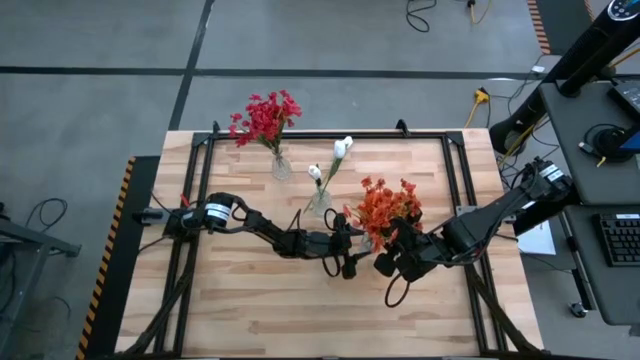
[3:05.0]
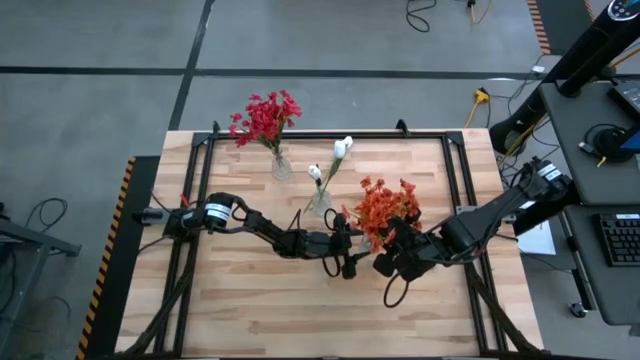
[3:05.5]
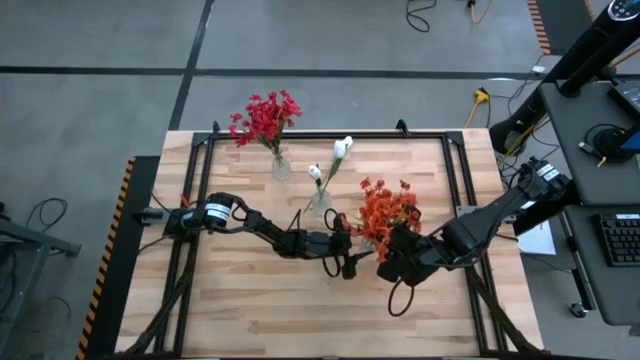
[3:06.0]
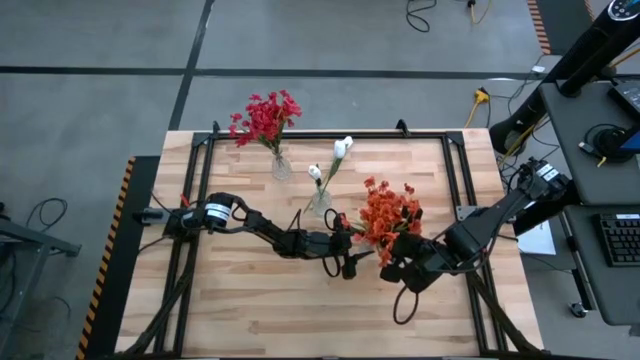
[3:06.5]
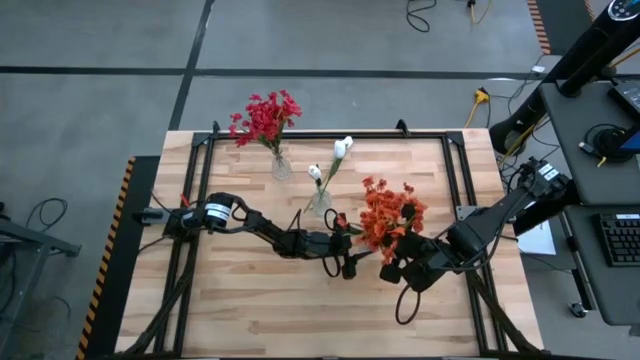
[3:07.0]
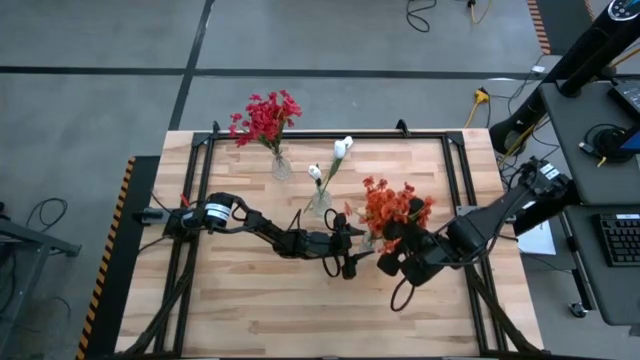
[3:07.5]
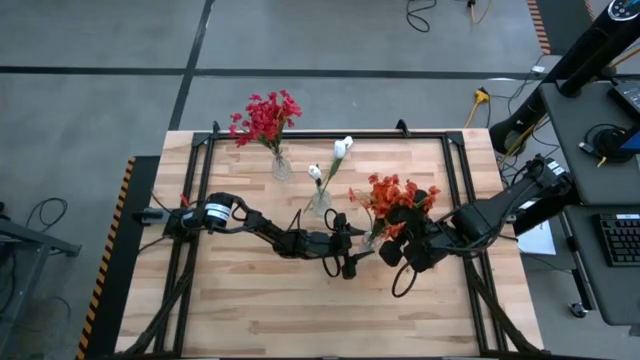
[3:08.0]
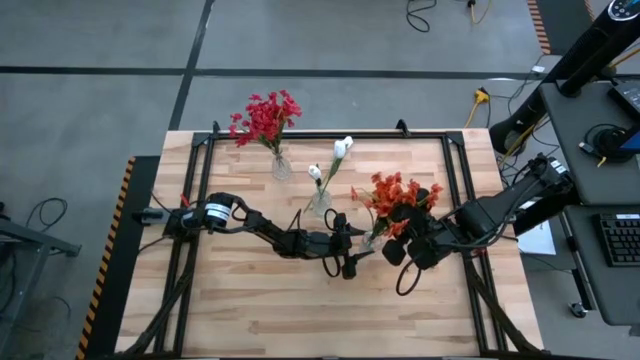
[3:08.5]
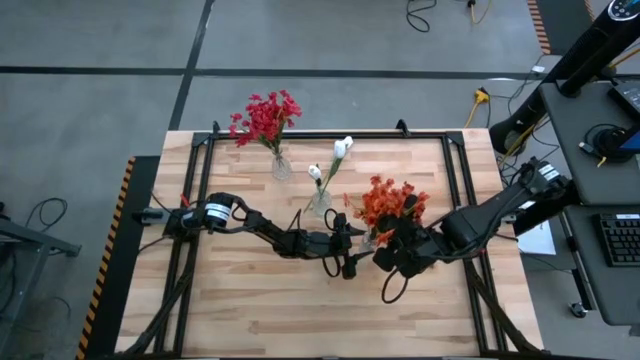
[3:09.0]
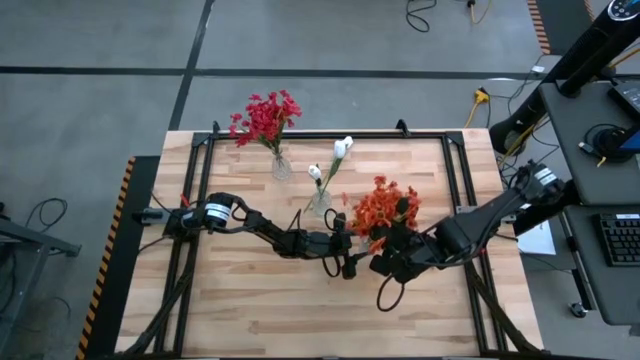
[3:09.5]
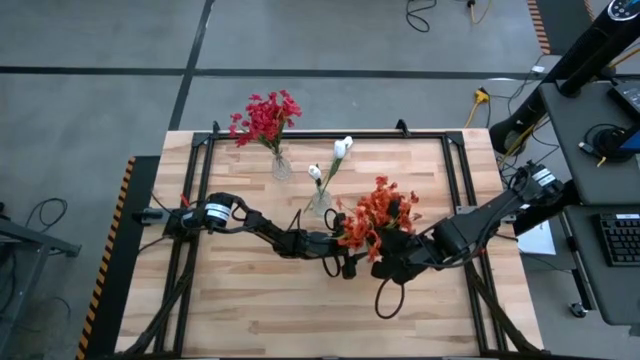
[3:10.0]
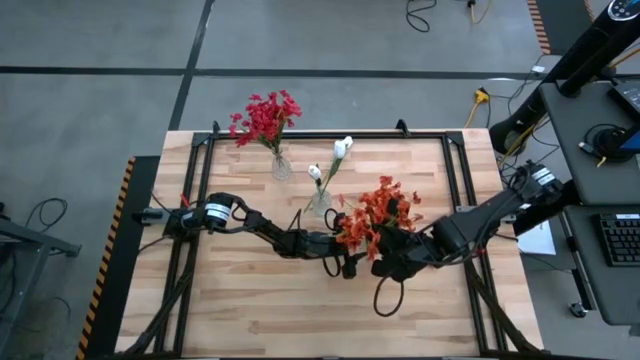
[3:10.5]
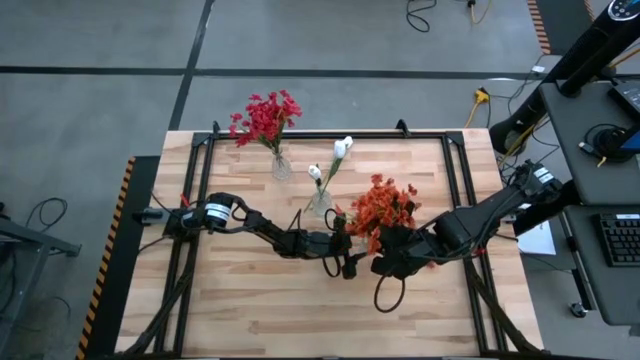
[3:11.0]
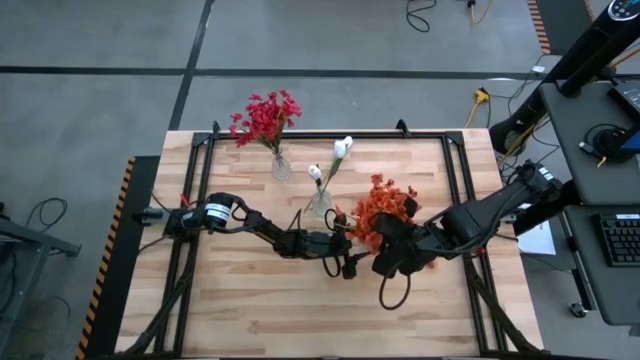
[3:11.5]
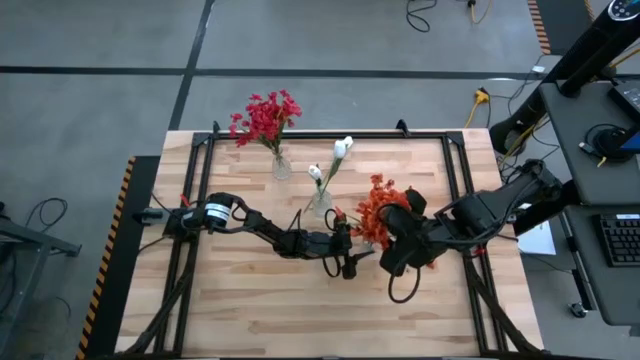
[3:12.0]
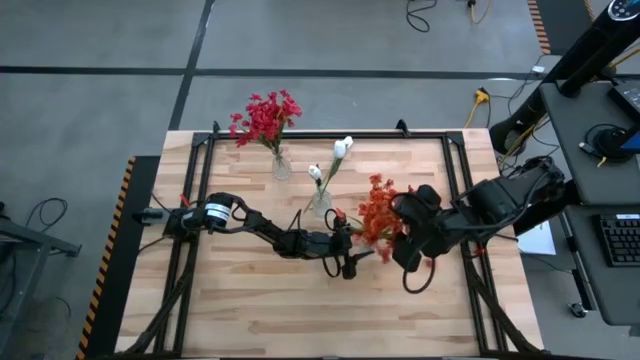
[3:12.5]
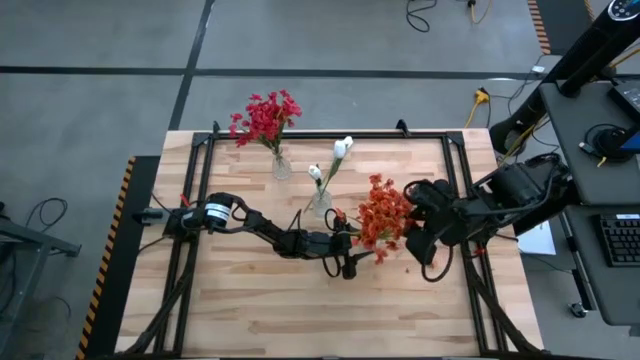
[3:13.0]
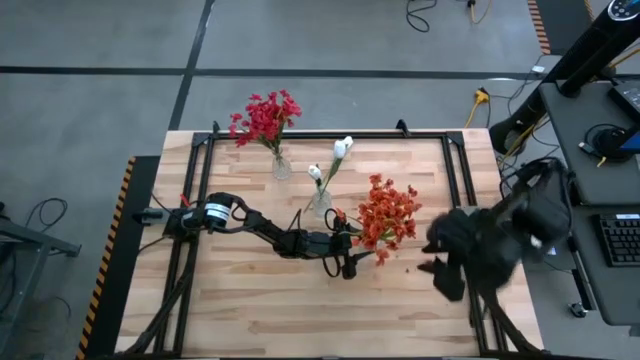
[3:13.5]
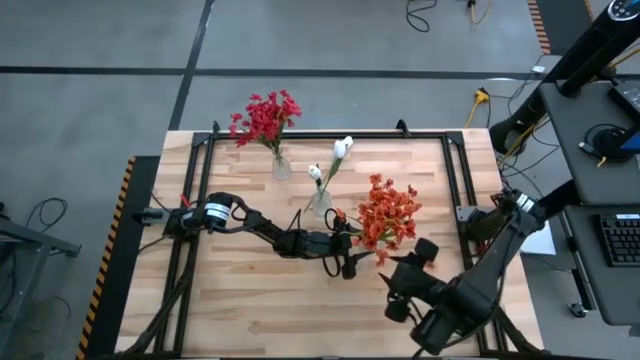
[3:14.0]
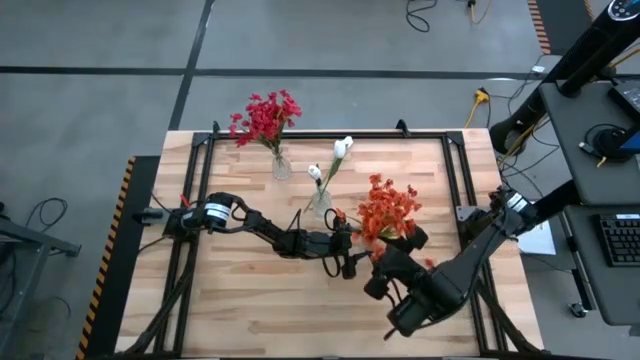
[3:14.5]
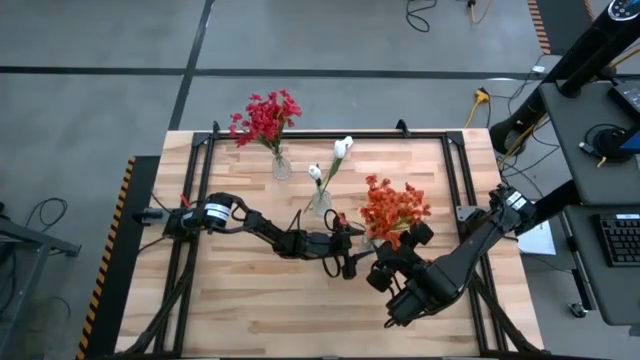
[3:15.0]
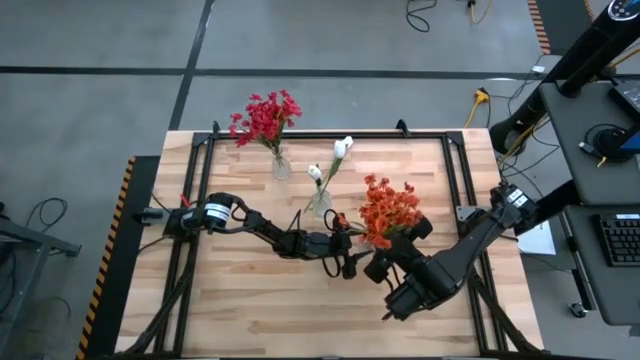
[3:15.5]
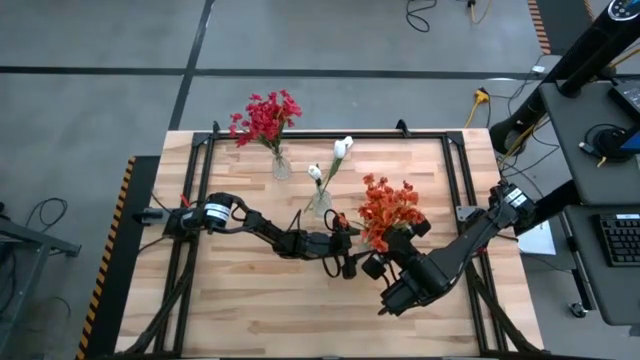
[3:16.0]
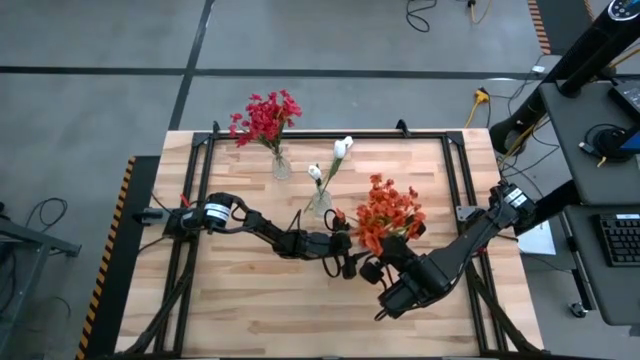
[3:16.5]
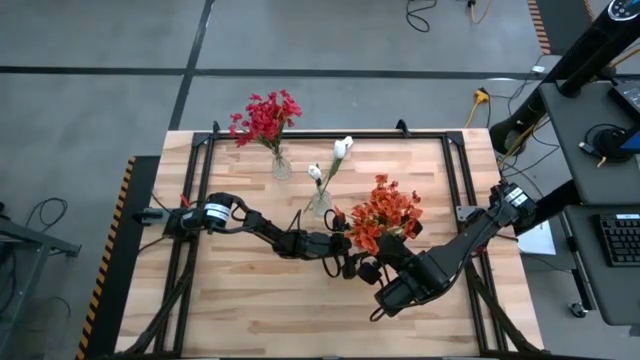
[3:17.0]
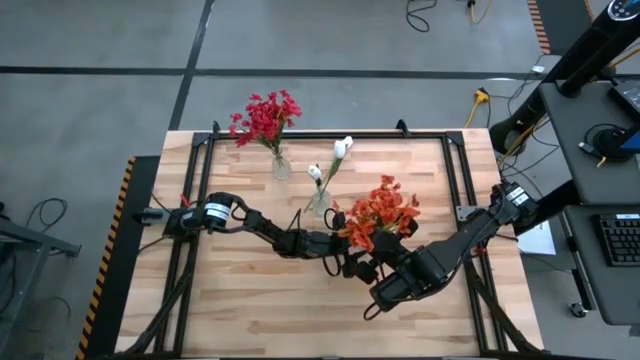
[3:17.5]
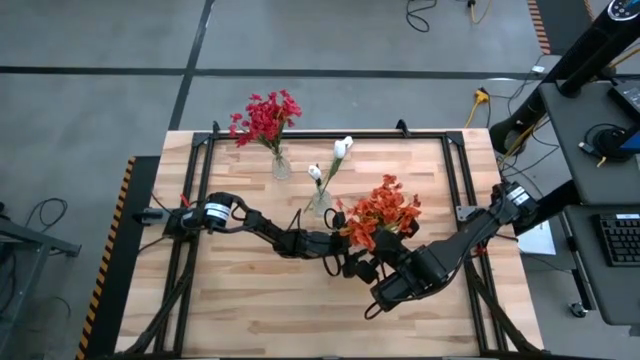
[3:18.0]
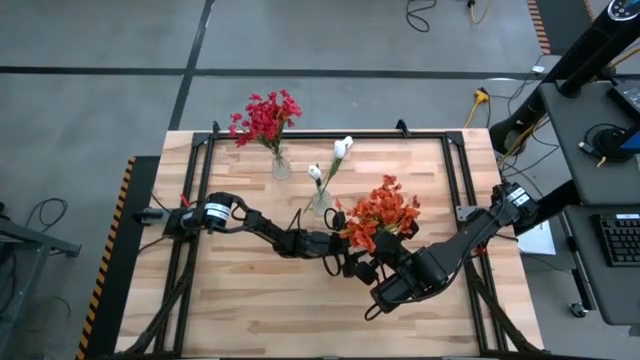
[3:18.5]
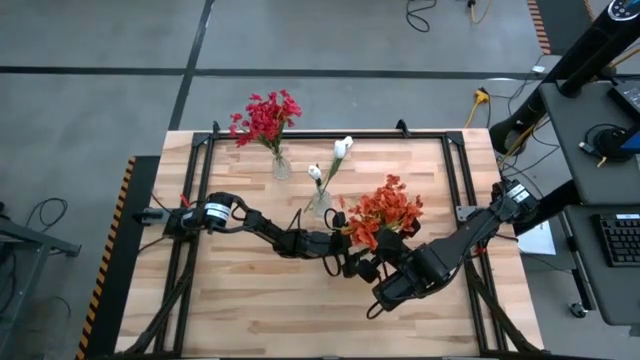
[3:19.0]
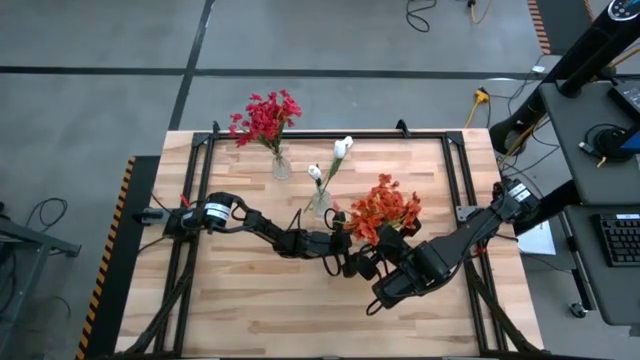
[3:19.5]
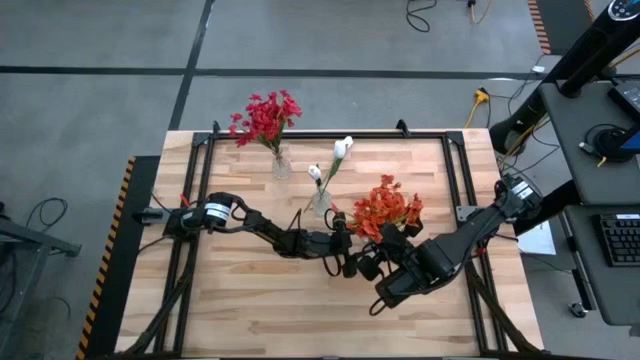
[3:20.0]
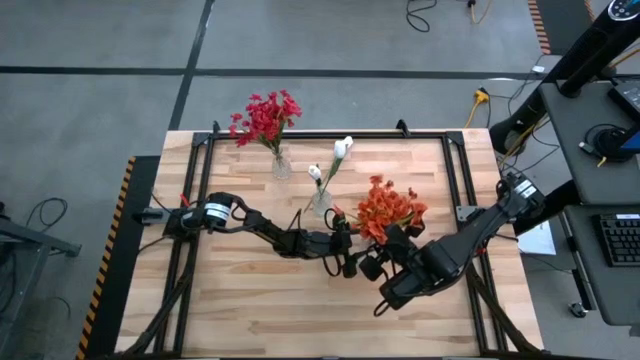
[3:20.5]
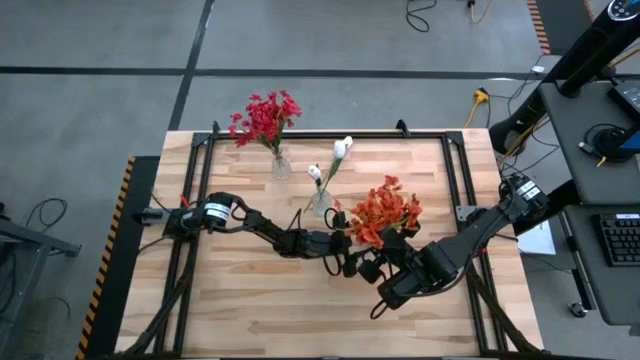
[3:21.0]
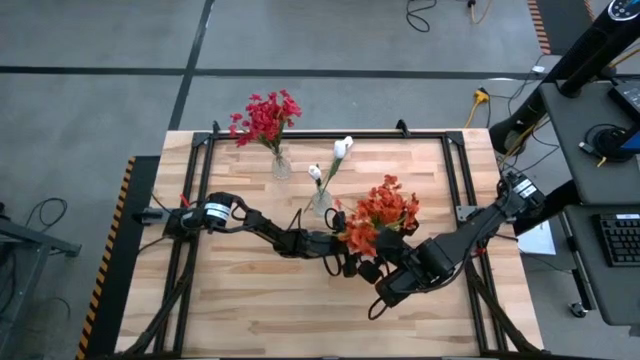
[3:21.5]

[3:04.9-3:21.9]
Task: Sort flowers into vase by color
Put the orange sprig flower into the bottom right transparent glass vase

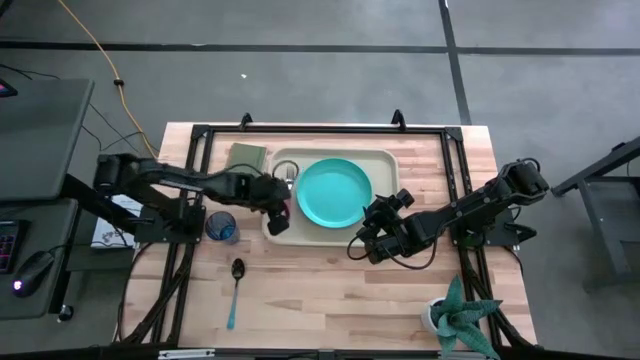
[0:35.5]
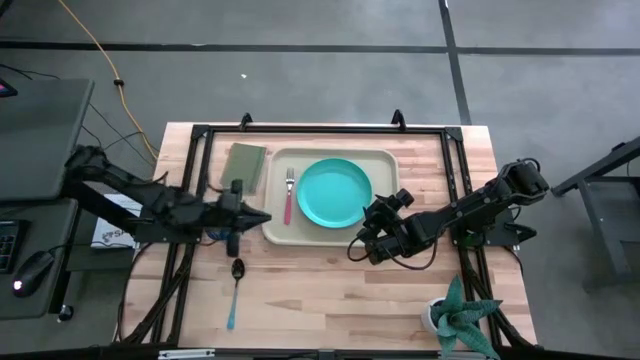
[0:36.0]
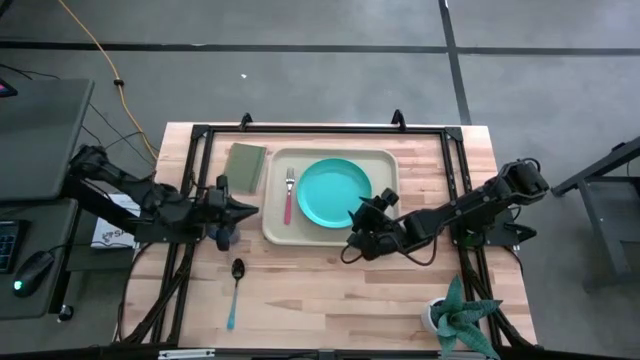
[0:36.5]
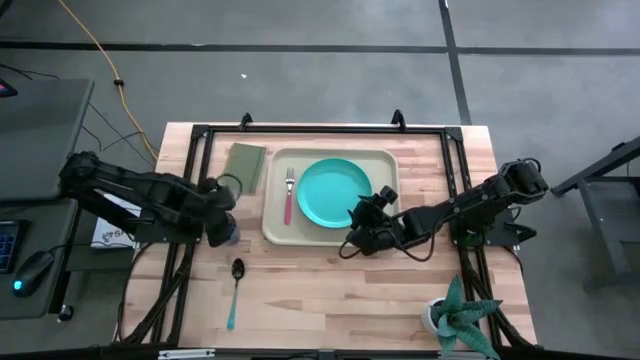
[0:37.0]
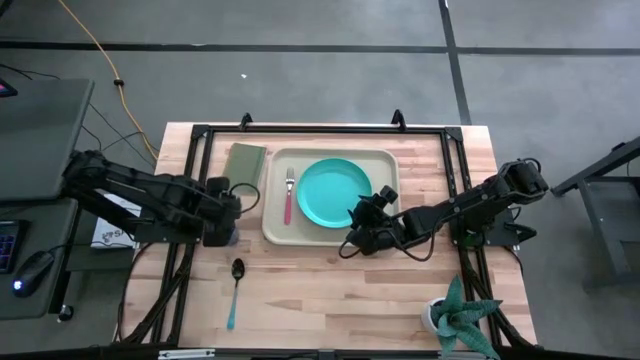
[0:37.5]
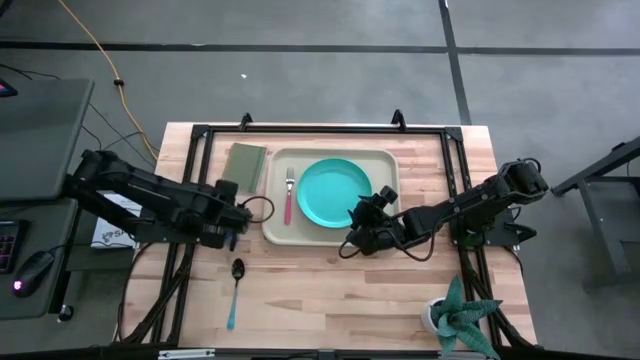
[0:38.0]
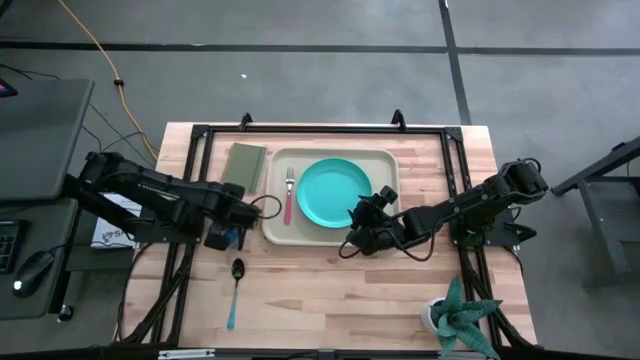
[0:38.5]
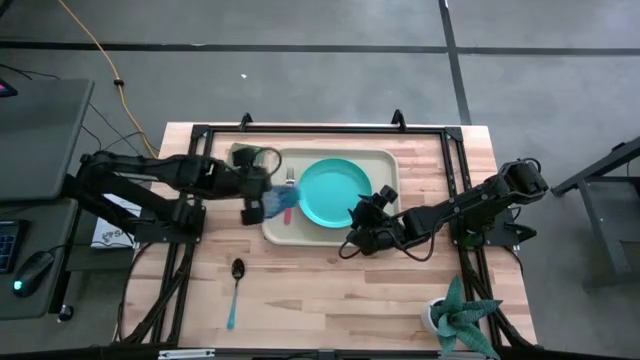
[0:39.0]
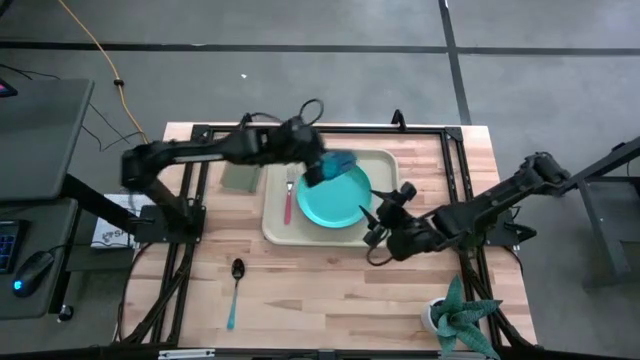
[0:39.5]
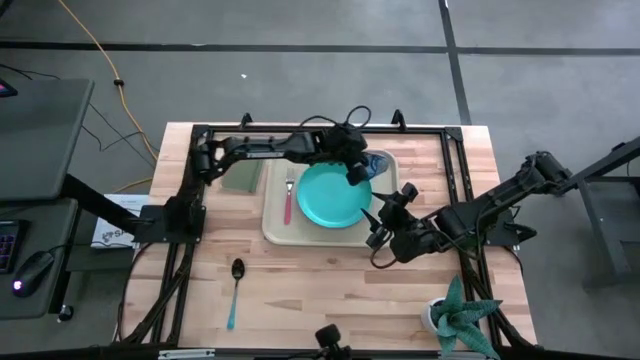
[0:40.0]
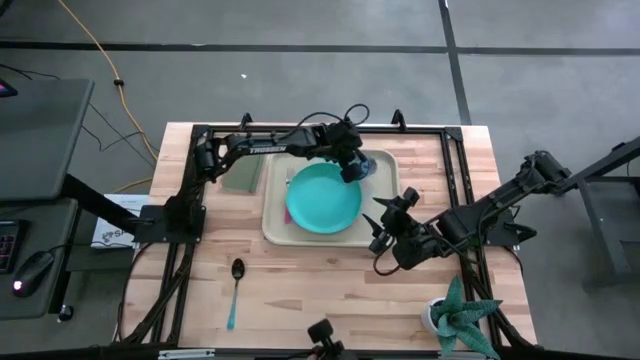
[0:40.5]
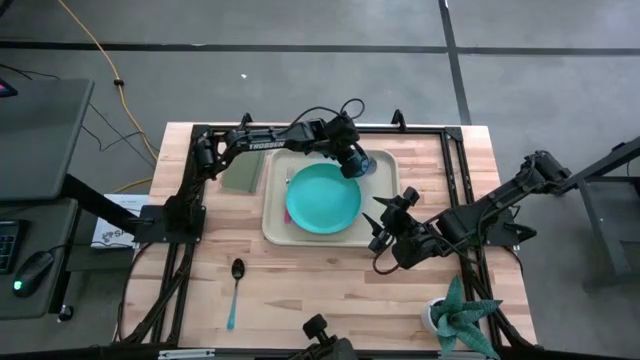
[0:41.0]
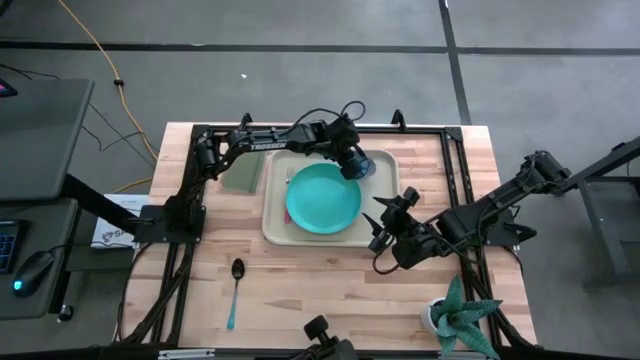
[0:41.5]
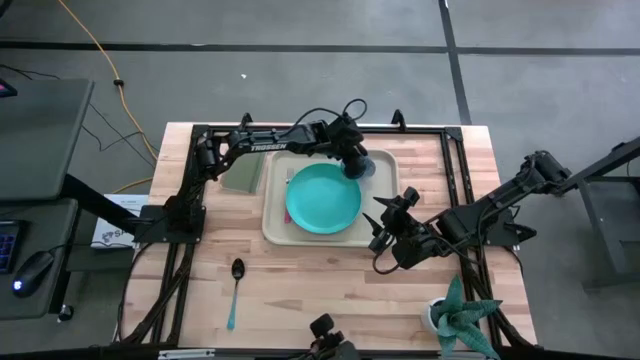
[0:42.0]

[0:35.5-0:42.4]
Task: Pick and place plate/cup/fork/spoon on tray
Put the blue cup on the top right of the green plate
